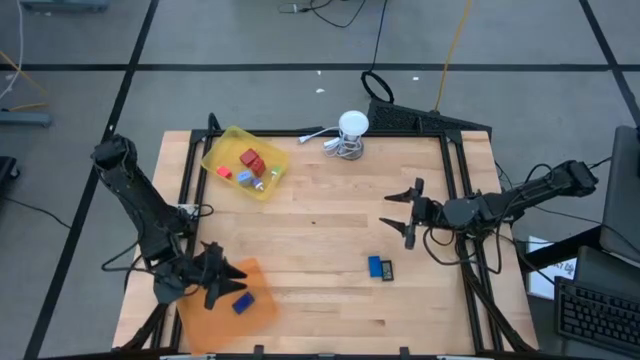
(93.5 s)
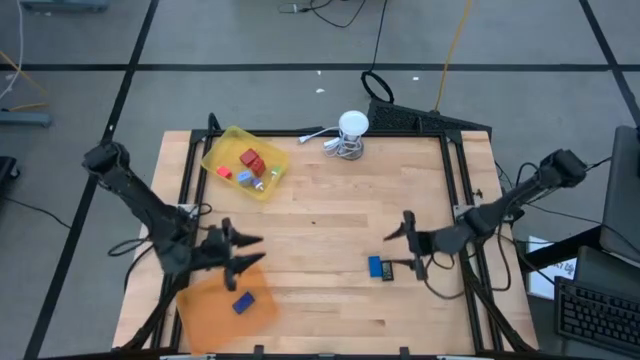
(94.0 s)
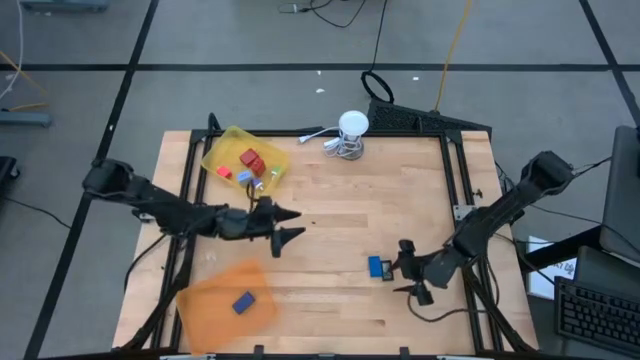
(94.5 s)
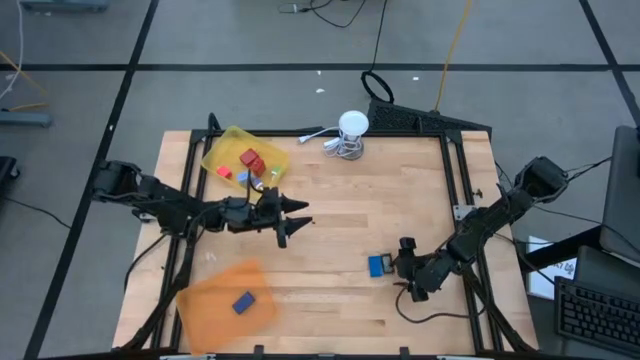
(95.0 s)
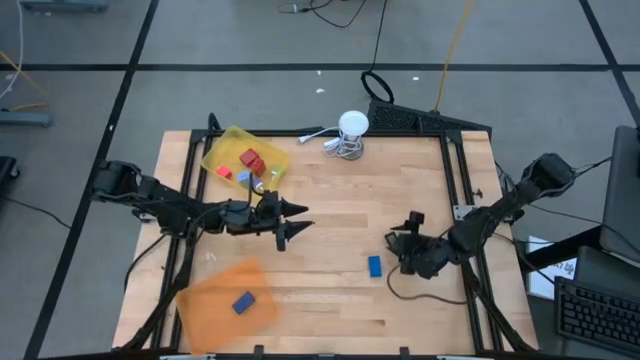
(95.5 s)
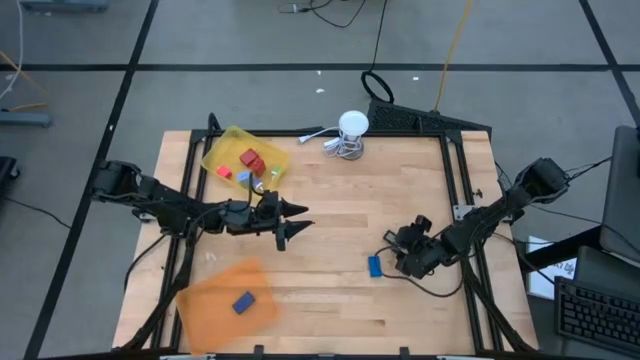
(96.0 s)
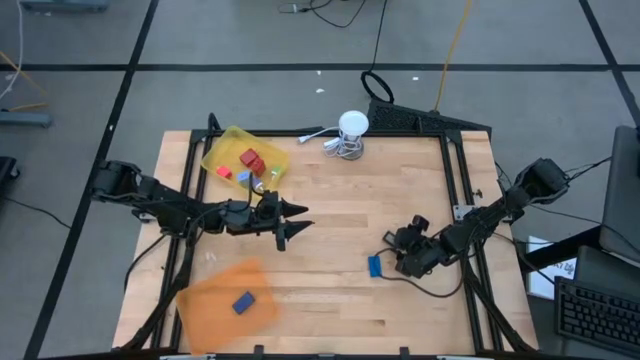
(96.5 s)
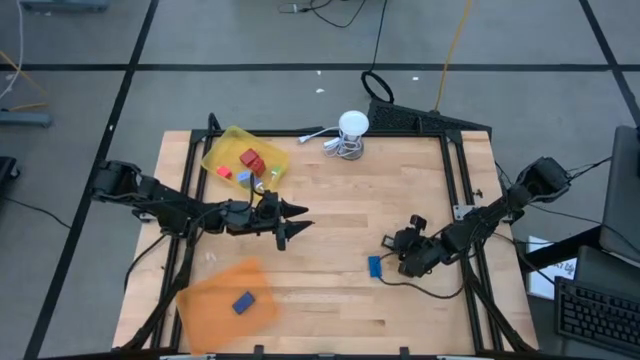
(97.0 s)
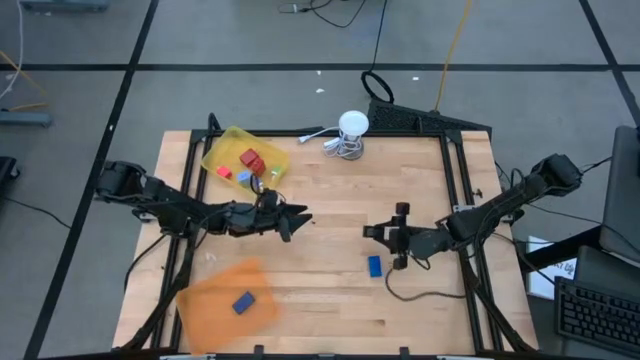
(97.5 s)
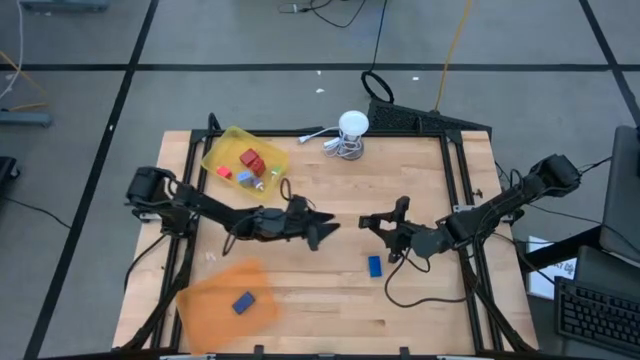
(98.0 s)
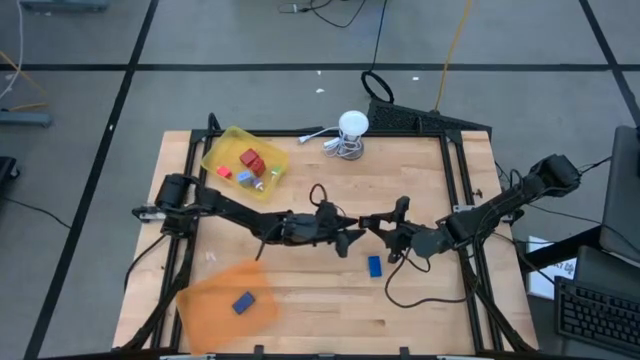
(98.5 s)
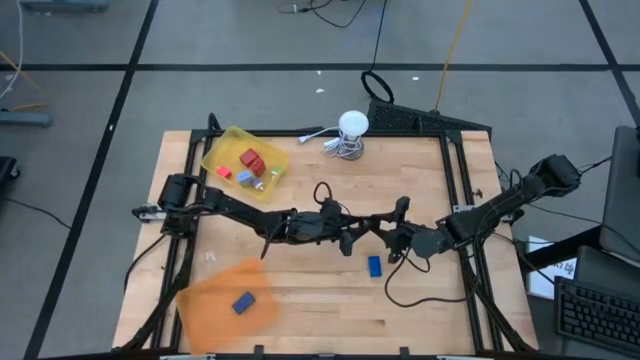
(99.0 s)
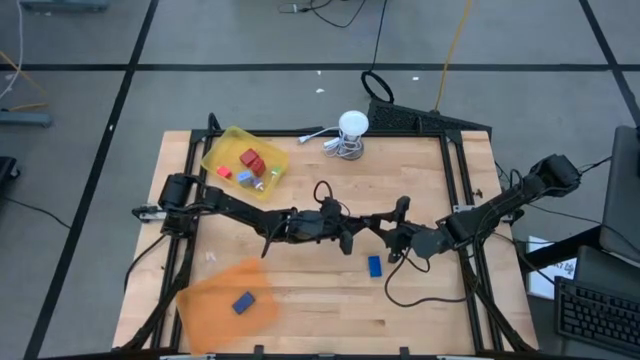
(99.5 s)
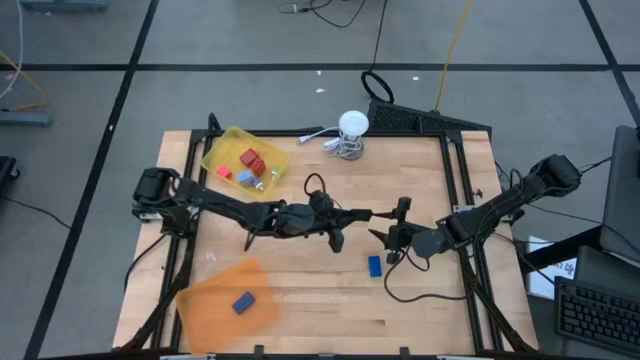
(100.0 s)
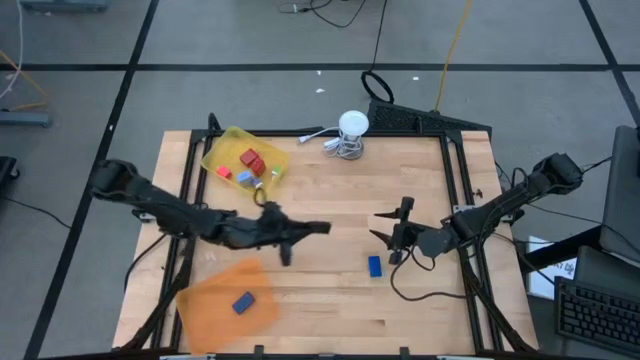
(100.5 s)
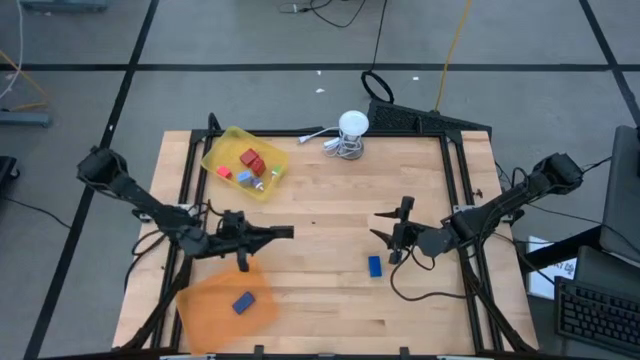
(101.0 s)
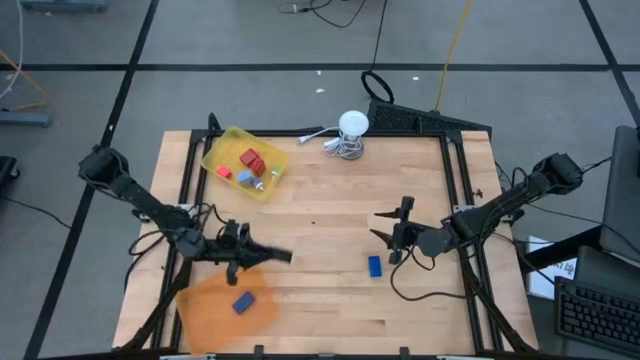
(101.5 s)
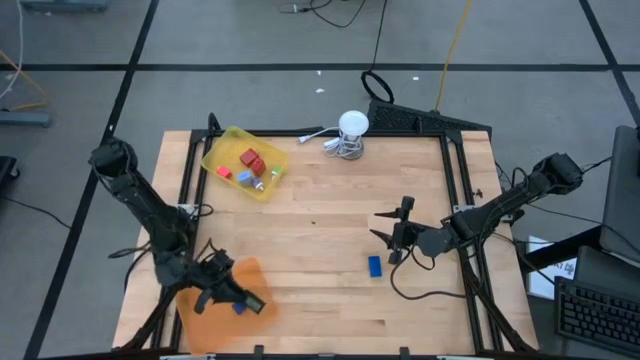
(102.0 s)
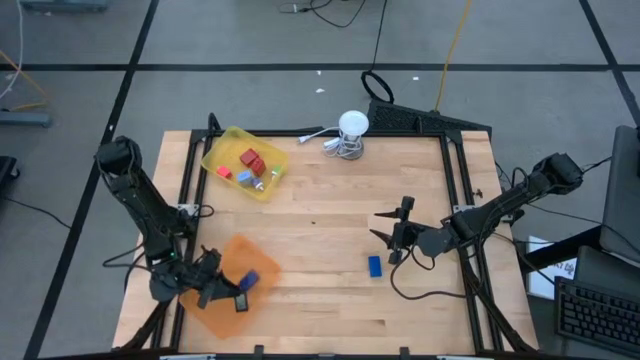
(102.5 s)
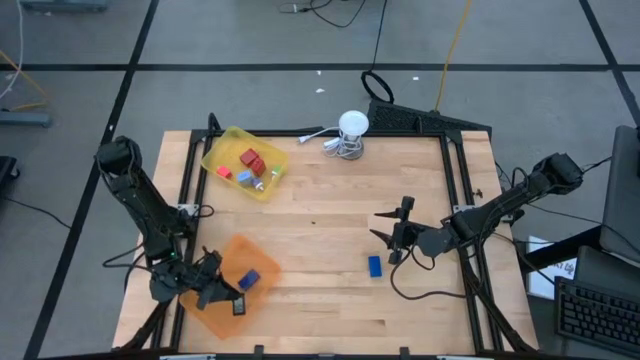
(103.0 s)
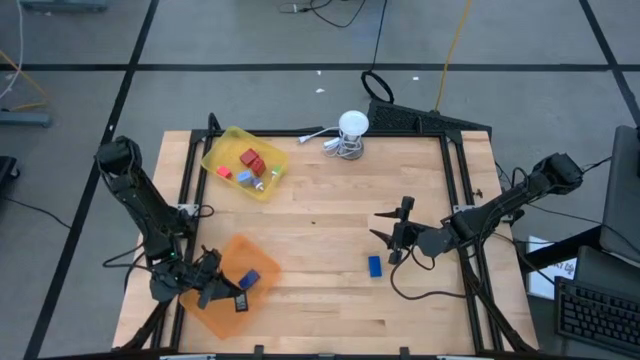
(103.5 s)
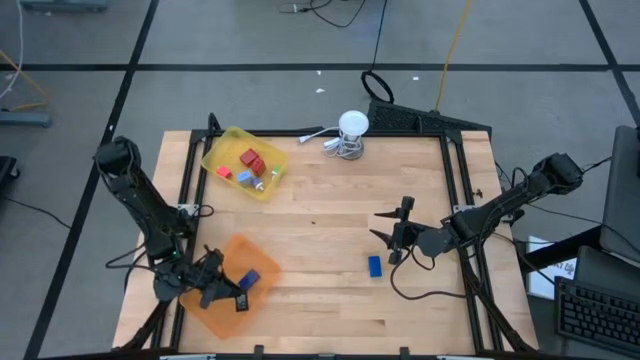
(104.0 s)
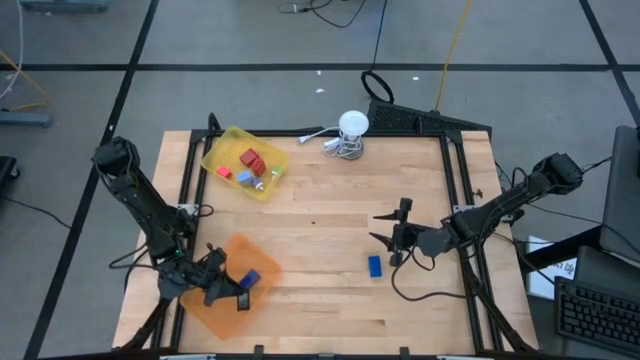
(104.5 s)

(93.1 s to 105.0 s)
Task: Pick & Place Office items
Put the black digital timer into the orange bin

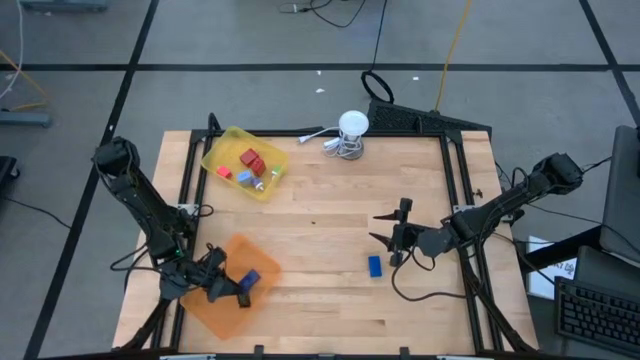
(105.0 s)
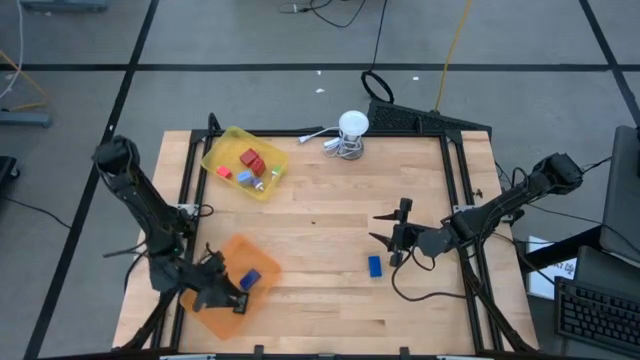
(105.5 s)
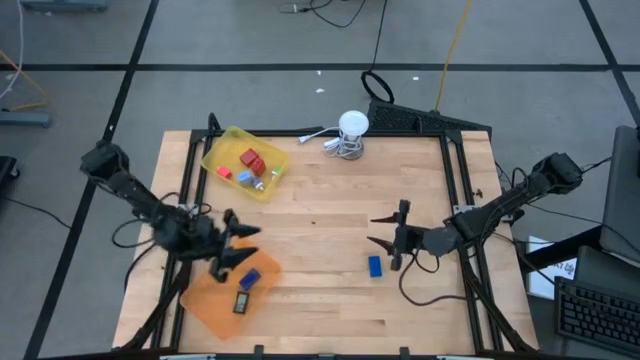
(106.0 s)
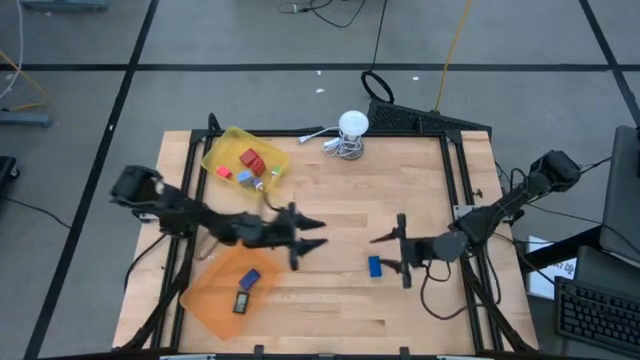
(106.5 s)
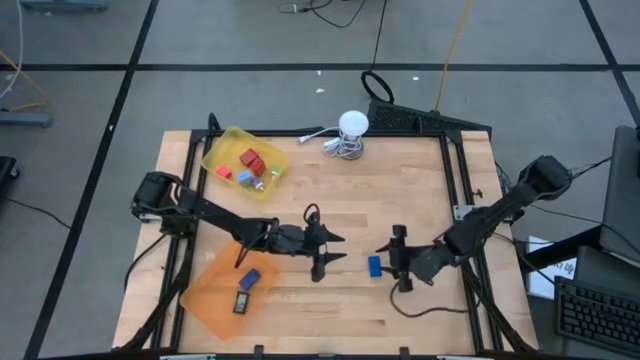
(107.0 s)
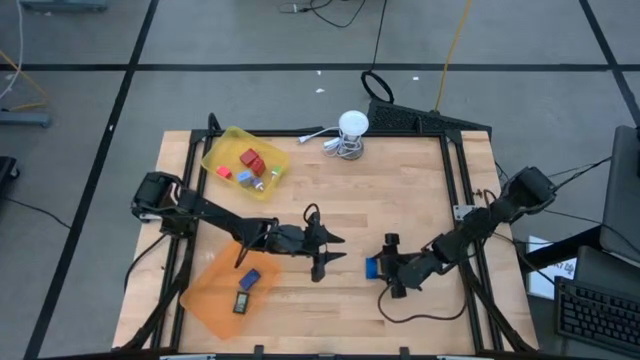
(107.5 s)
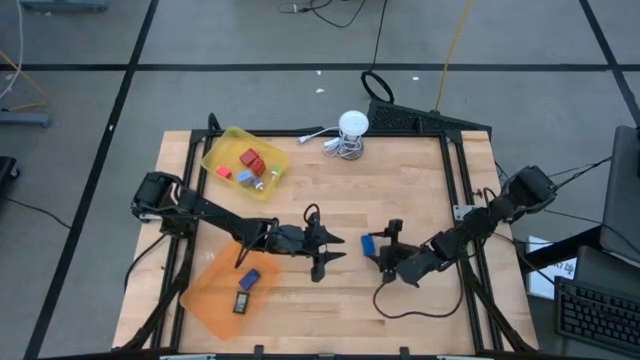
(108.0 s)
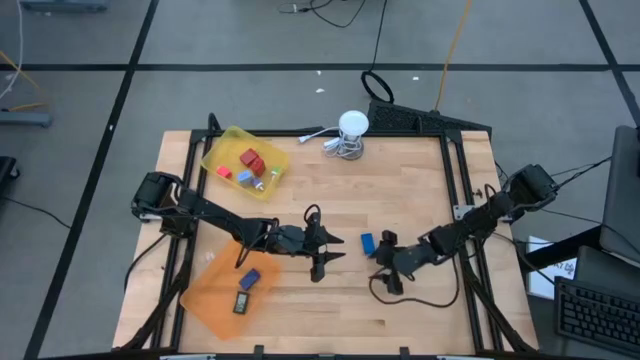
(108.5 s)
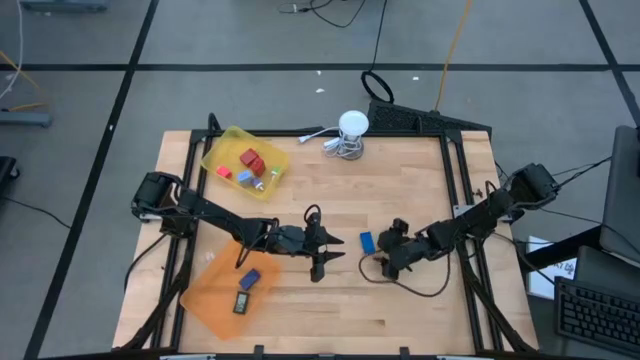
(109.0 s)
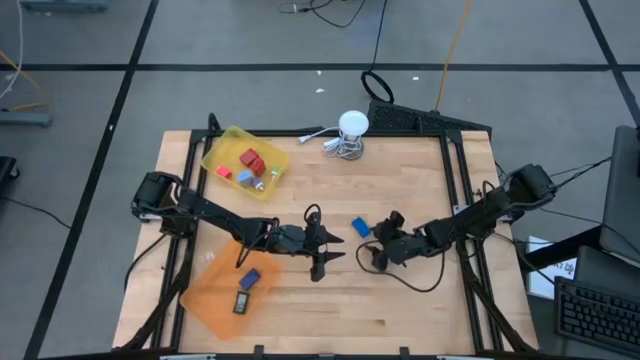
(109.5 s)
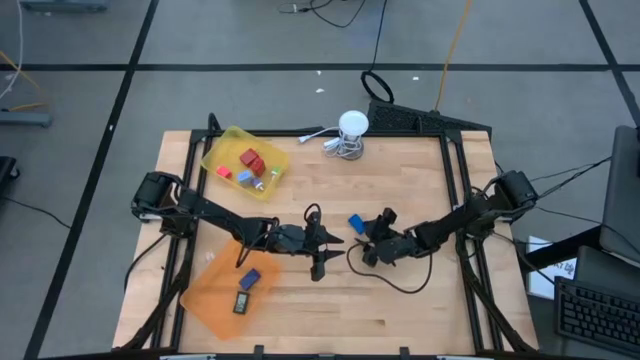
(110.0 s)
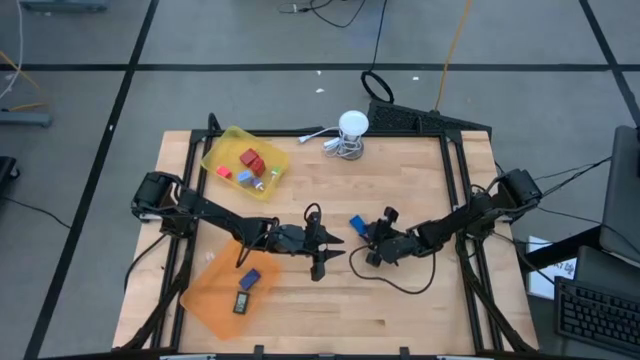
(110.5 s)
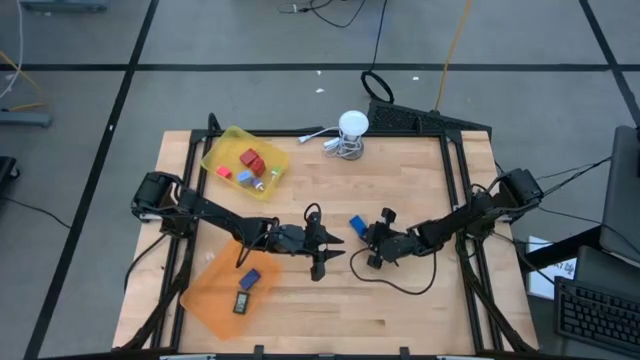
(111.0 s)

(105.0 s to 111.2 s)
Put the blue digital timer into the orange bin

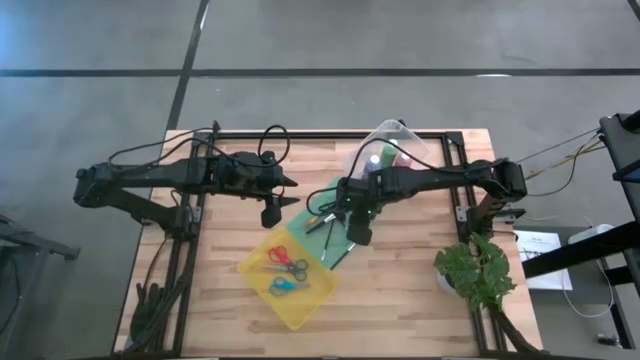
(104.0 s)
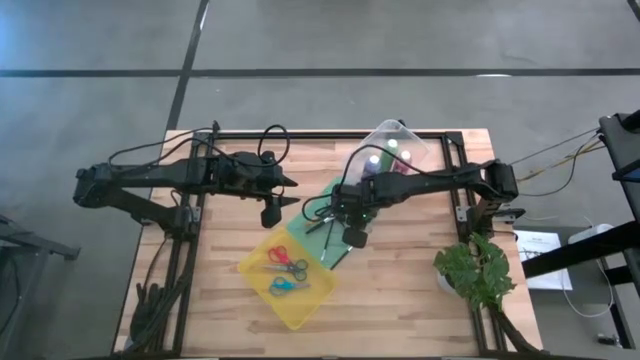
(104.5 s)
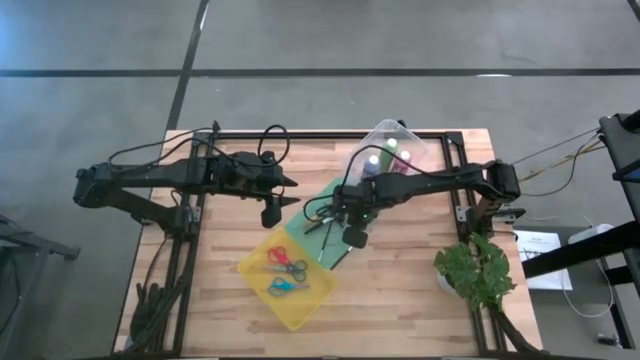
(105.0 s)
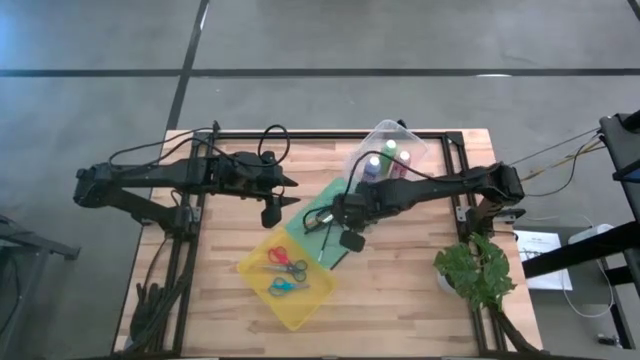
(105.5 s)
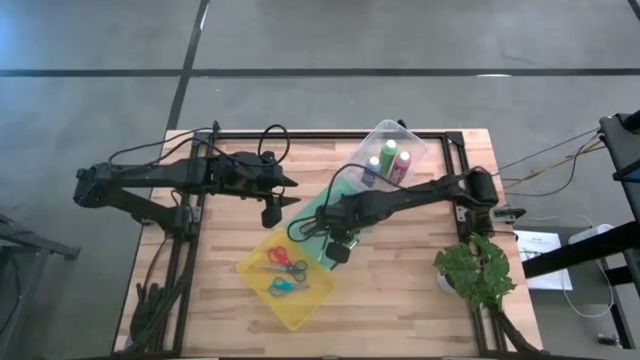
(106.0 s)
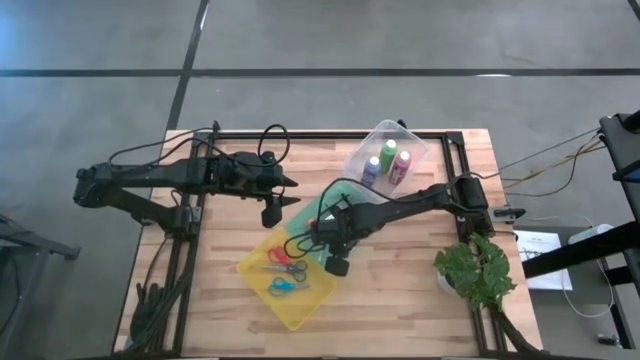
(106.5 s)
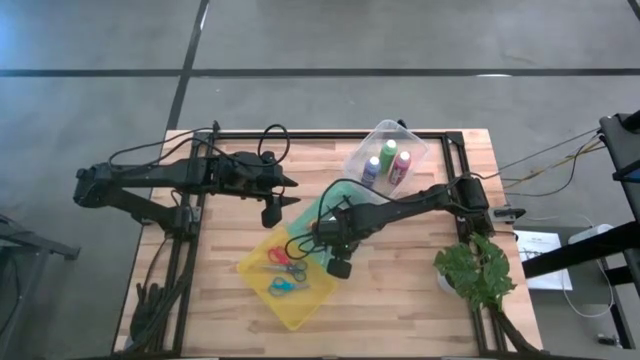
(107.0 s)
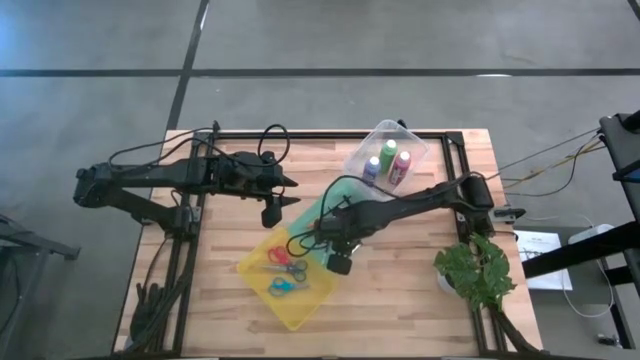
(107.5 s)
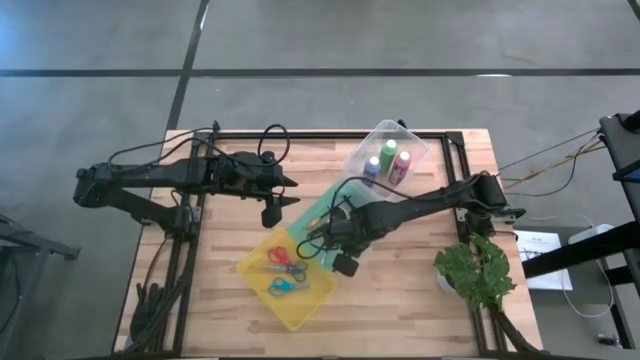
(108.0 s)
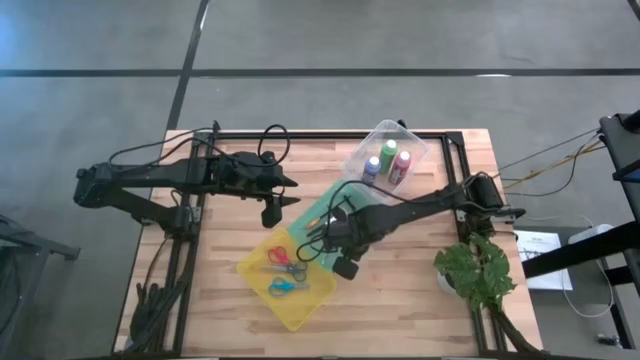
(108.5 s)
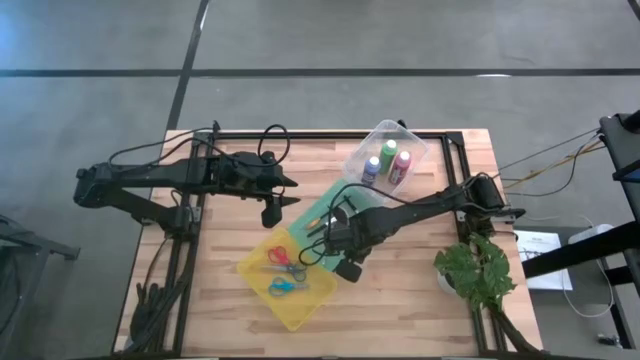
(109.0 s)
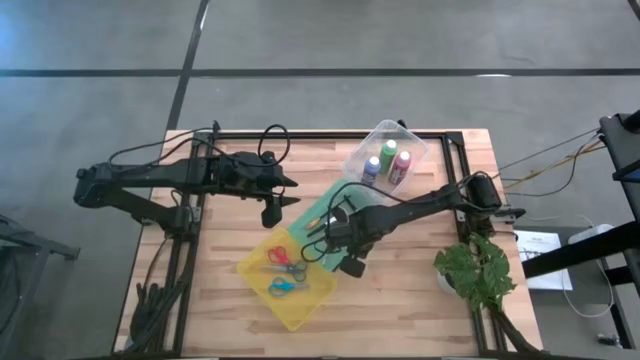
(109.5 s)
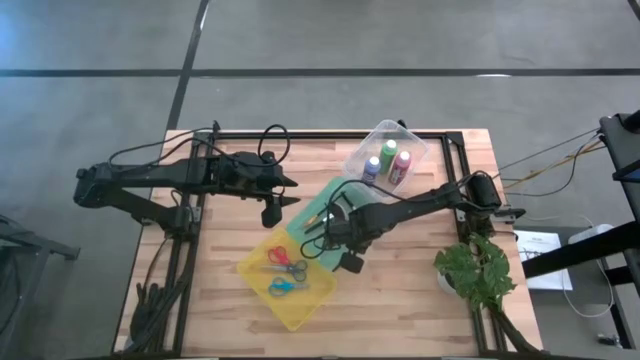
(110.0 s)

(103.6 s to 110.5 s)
Task: Pick & Place Paint Supplies
Adjust the green bin
